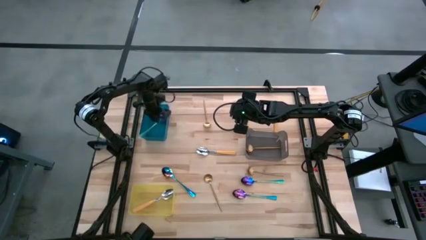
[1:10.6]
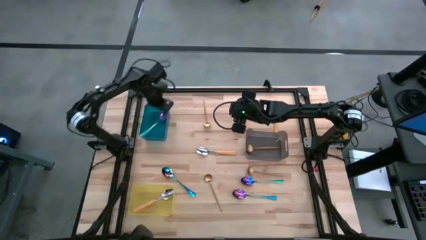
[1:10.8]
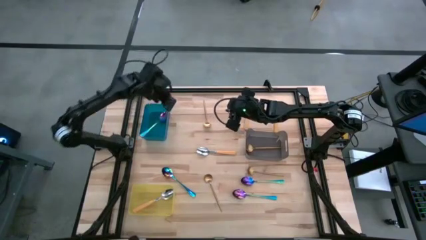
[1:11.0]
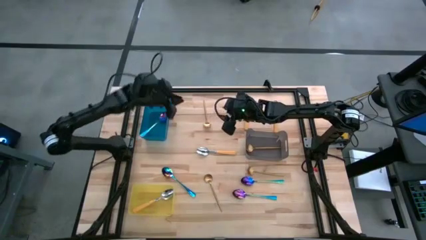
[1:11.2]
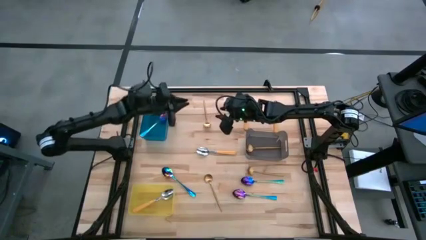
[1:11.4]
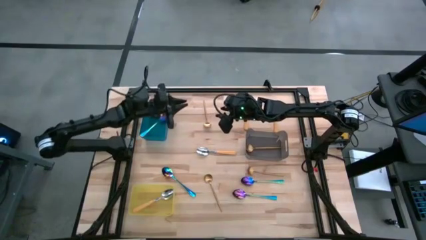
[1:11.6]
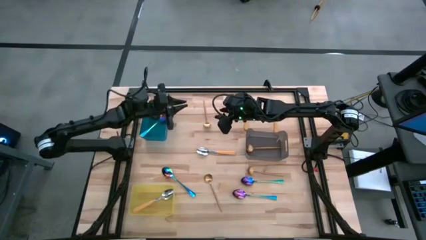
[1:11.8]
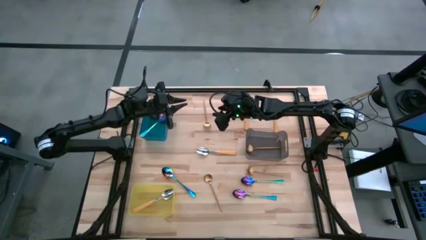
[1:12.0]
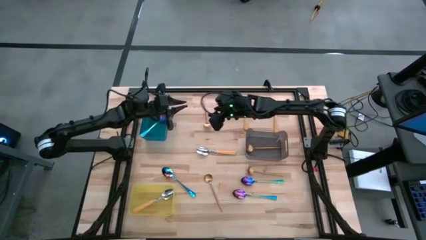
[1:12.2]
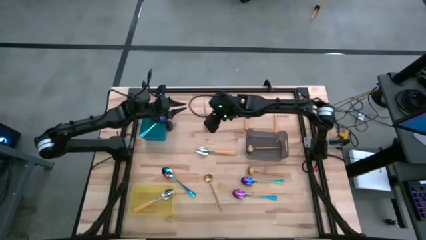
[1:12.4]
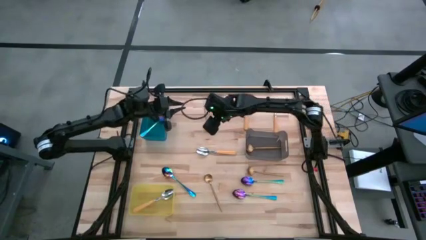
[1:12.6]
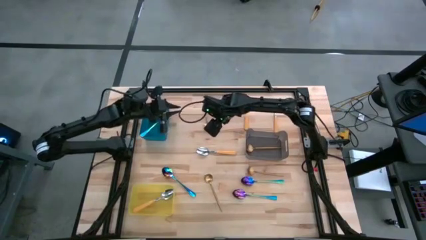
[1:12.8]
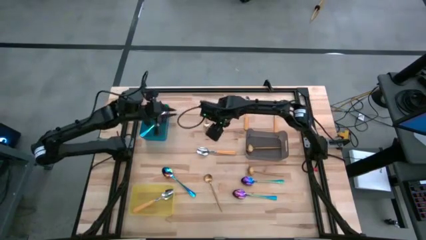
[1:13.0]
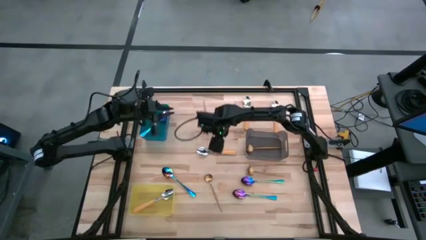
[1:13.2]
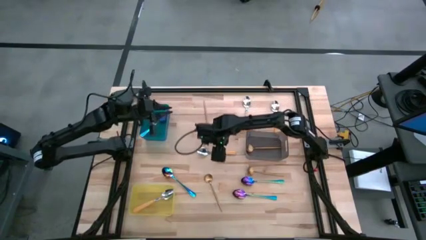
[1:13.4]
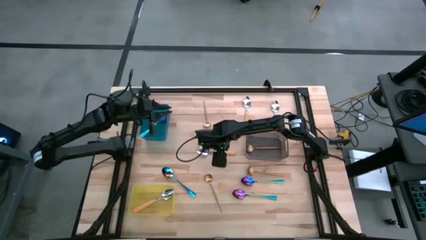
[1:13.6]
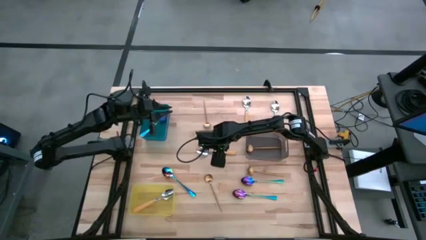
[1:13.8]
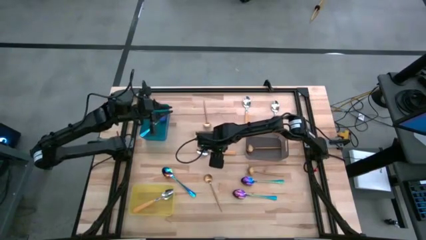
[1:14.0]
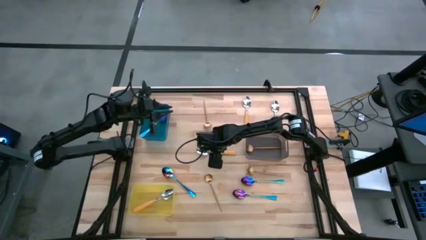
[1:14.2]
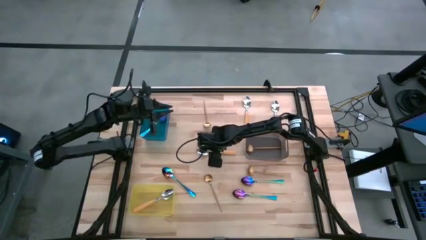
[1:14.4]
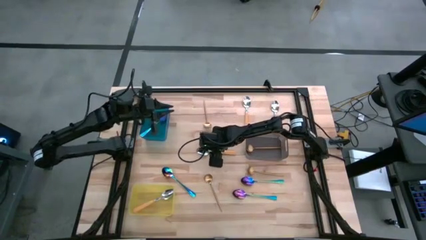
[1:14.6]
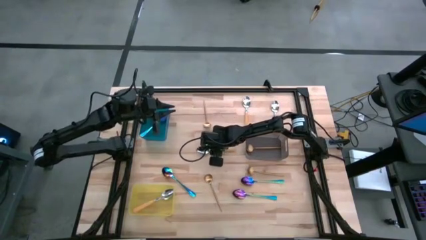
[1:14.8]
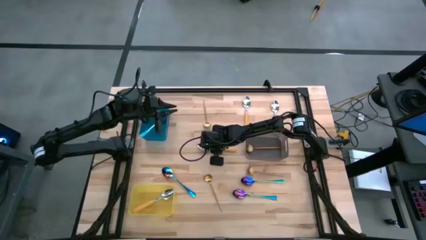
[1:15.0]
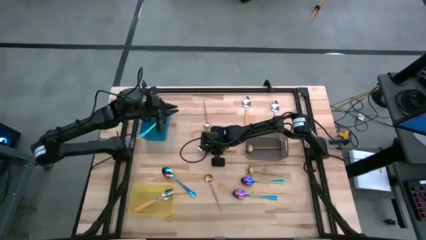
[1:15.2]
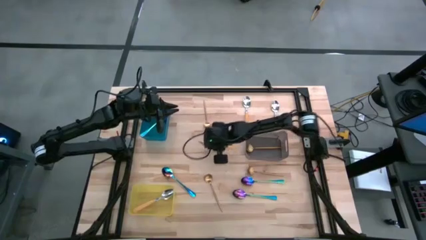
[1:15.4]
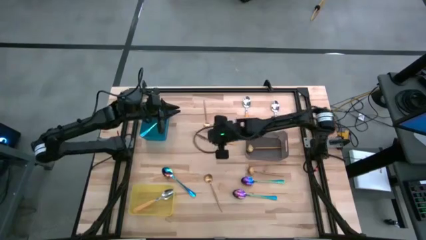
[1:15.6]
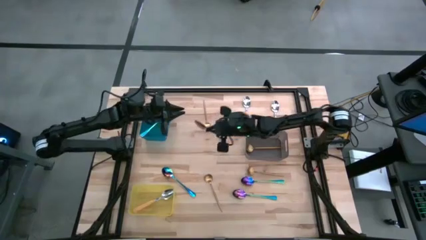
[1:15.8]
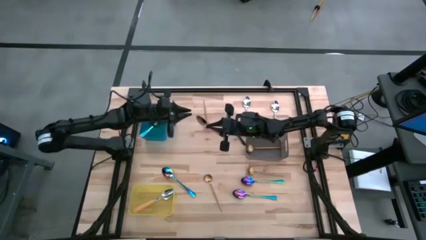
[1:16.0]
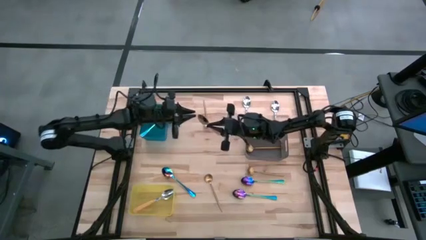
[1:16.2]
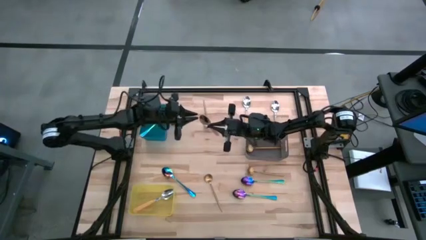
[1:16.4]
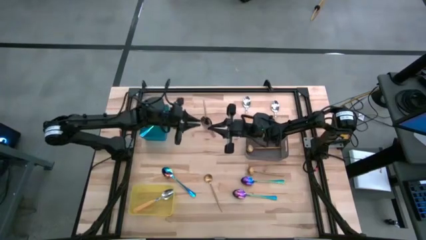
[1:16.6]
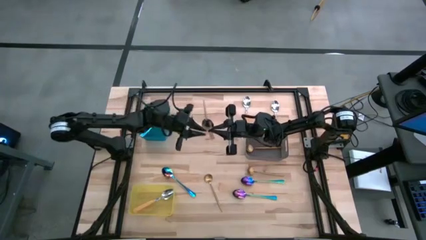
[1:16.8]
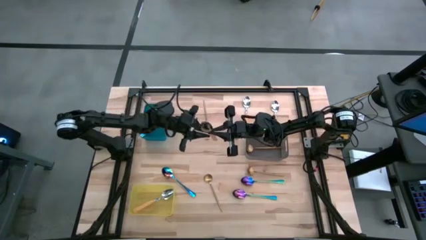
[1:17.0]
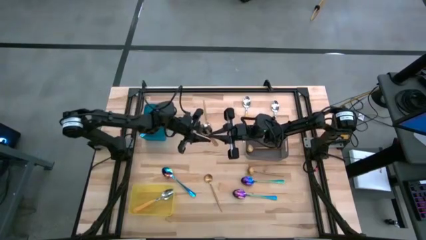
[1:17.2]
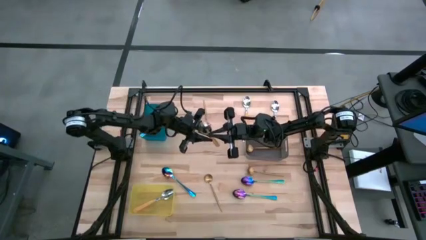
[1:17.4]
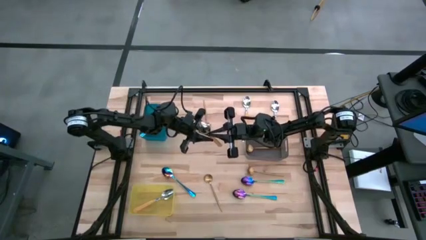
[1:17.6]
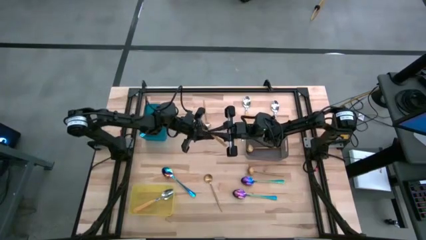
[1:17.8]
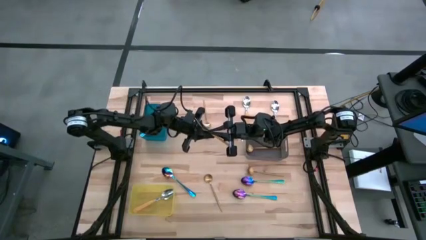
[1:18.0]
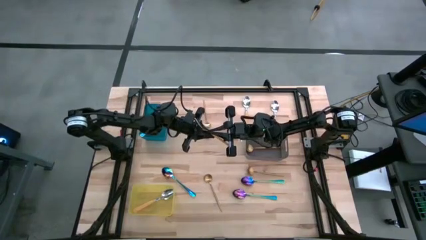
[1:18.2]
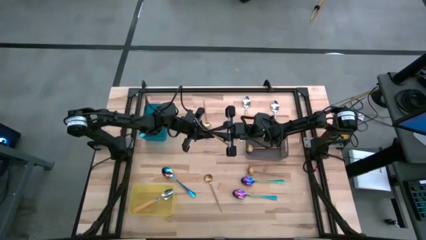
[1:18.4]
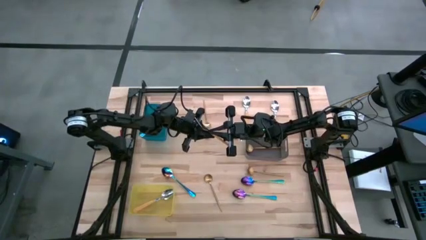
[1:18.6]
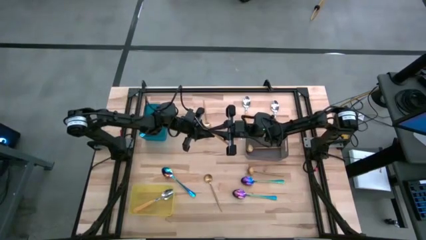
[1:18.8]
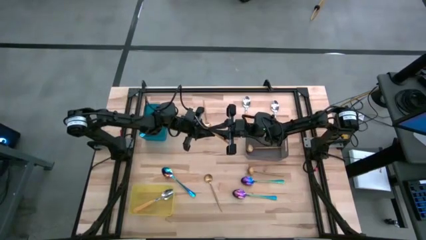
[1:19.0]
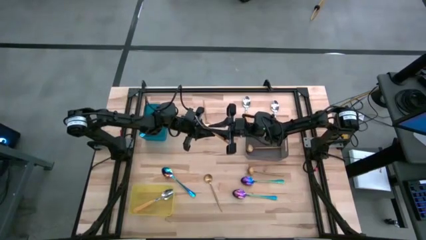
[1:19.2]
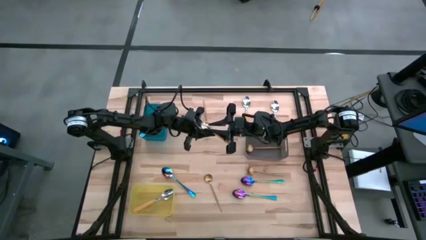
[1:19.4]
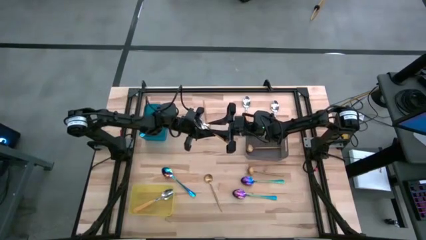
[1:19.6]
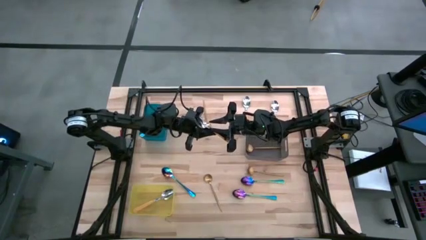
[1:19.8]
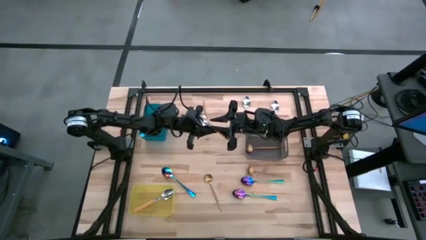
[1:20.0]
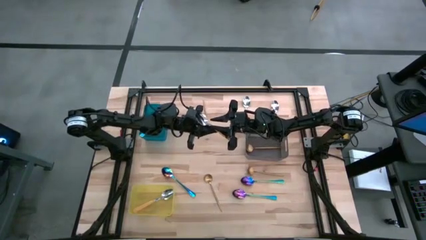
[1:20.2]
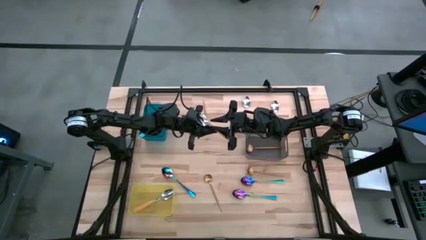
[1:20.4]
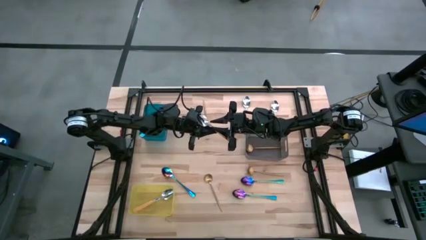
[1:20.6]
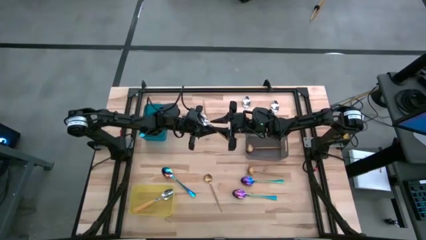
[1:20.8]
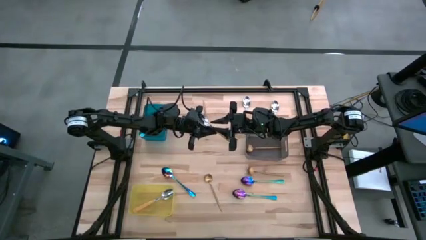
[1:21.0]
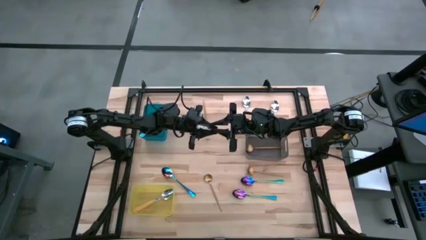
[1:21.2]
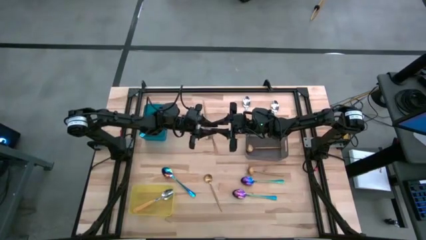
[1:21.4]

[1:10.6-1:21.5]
Task: Sort silverware by color (type)
Put the yellow spoon into the yellow bin

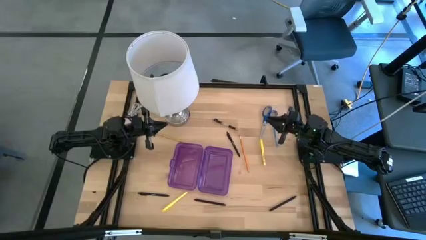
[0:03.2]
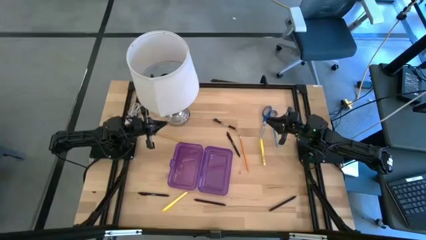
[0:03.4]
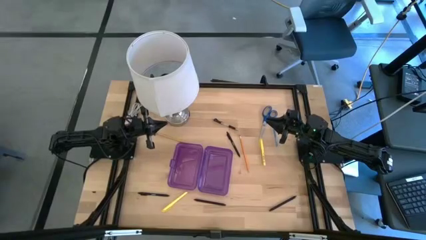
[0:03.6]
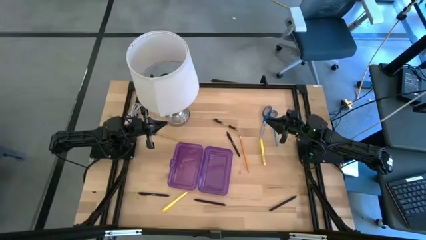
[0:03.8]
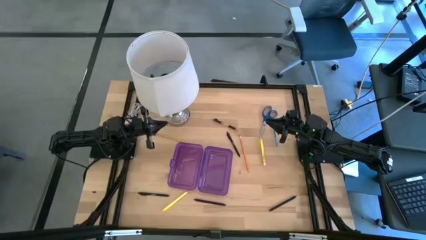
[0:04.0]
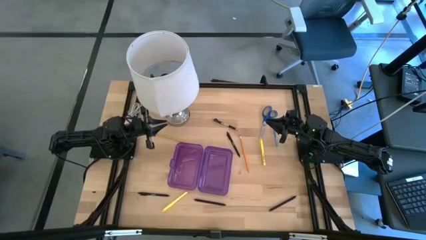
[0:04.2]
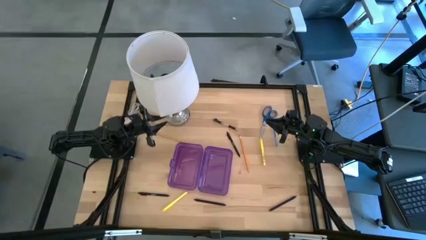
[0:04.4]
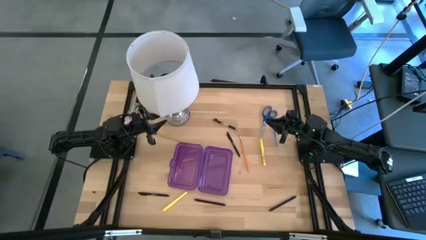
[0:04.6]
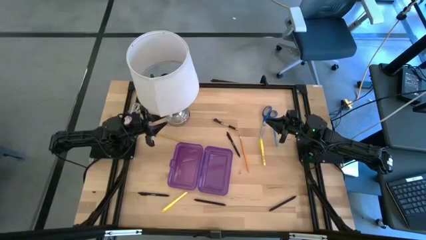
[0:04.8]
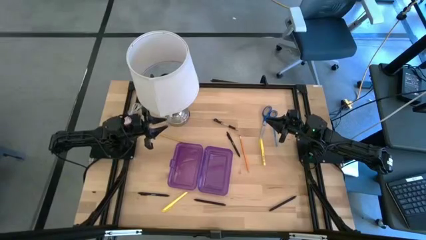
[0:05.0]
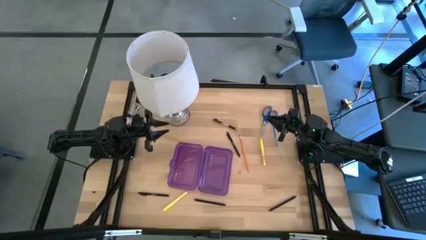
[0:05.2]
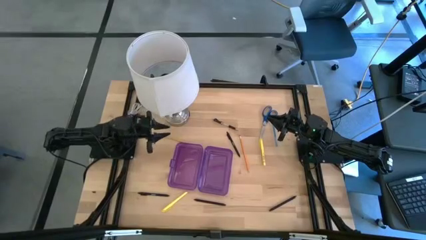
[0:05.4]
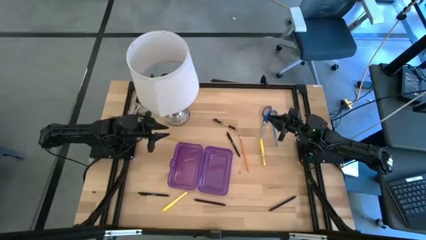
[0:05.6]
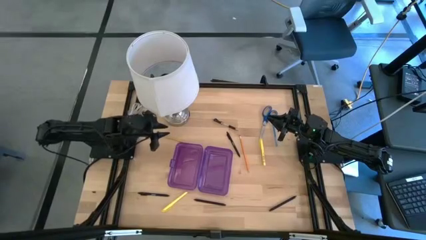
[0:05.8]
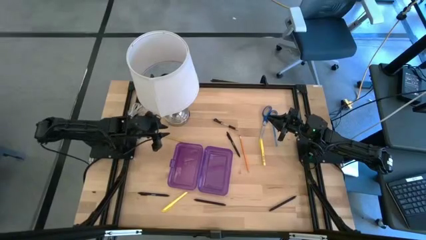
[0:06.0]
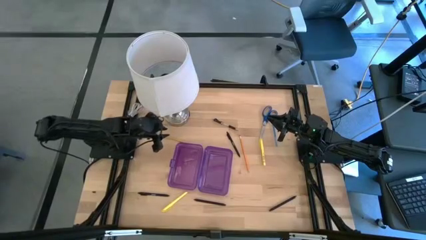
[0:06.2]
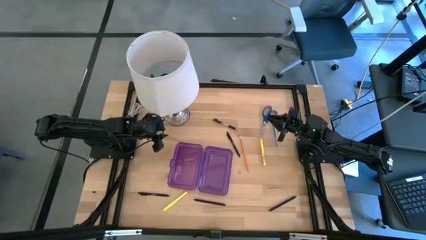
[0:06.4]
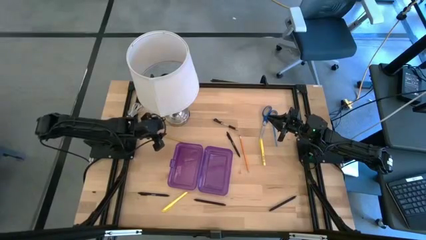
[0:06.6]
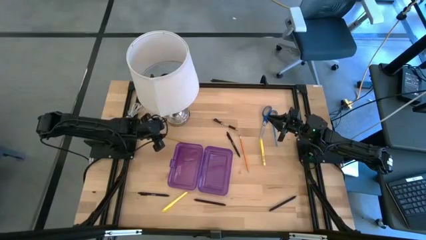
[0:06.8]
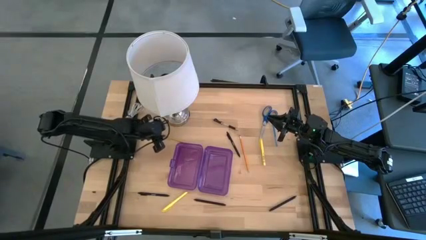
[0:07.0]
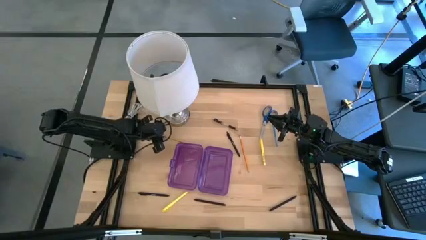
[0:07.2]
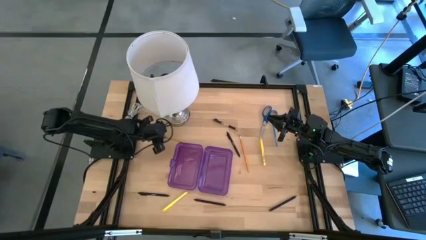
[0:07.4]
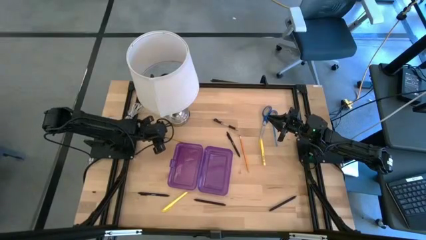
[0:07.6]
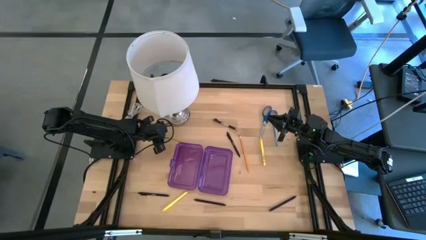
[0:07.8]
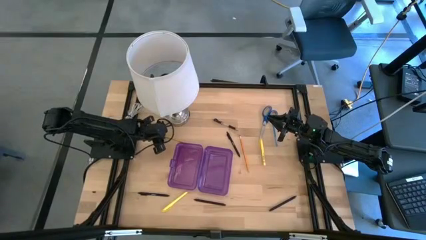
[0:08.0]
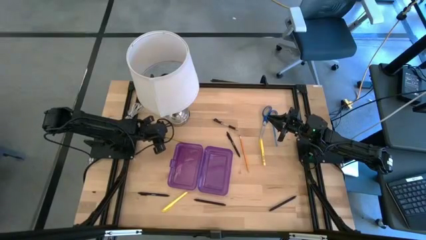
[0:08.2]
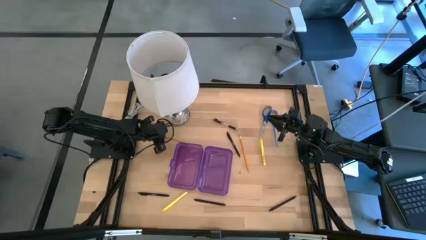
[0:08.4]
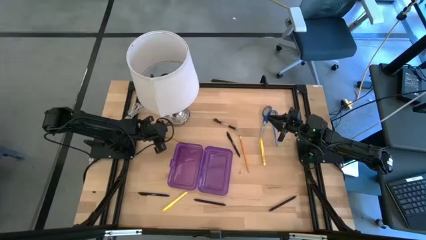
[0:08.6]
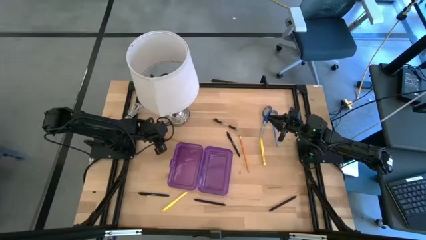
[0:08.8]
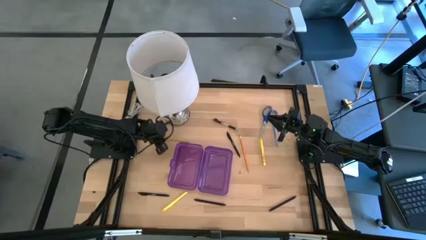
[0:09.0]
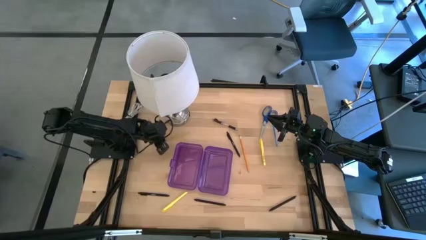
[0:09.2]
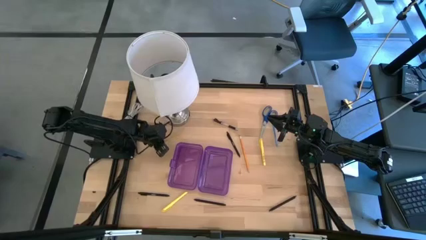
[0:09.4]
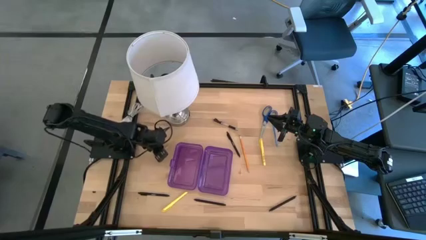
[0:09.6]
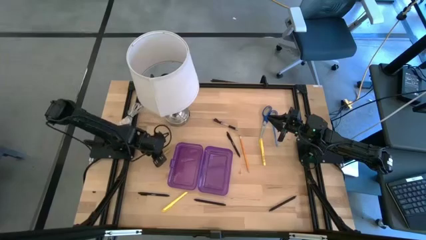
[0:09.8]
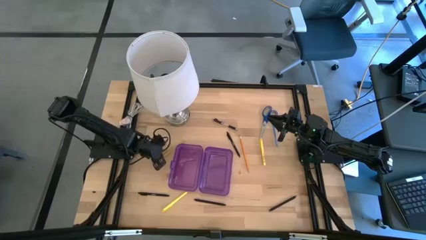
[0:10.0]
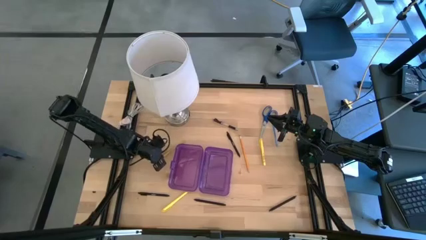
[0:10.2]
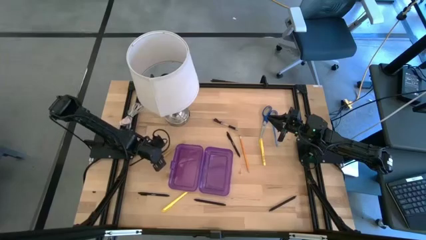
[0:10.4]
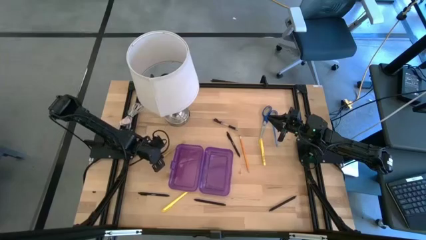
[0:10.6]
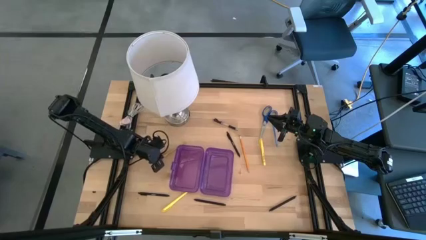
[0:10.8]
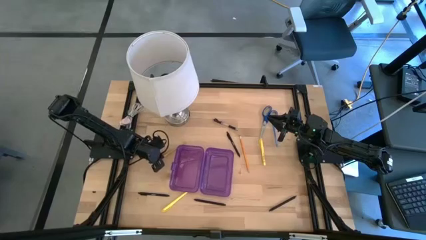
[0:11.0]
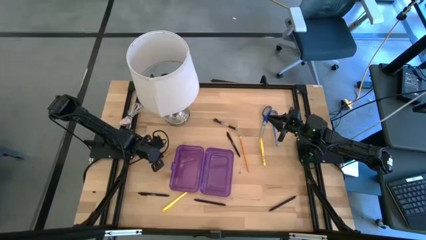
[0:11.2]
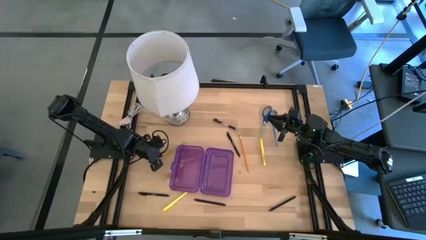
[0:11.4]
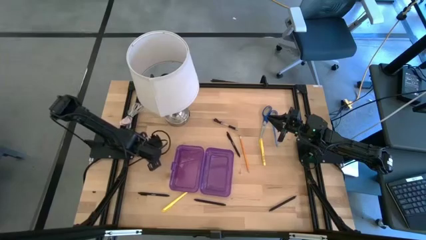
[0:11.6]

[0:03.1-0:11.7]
Task: Pick & place school supplies into a supply box
Put the yellow pencil into the purple supply box
